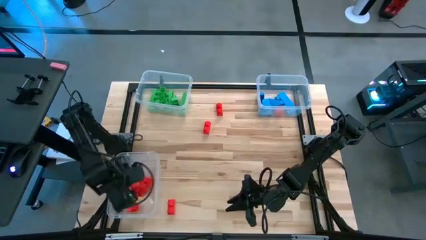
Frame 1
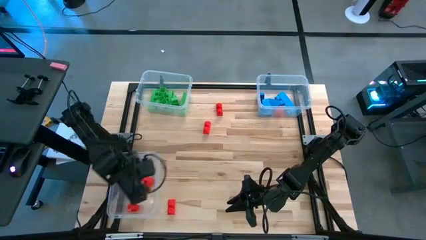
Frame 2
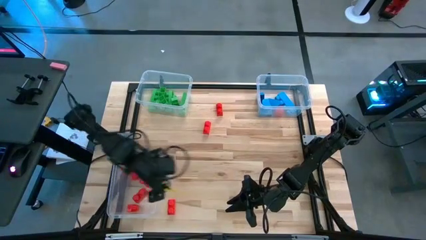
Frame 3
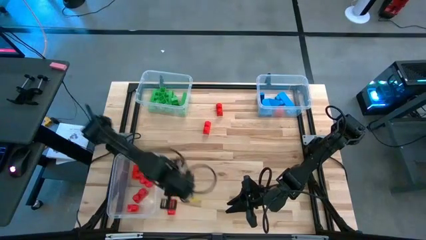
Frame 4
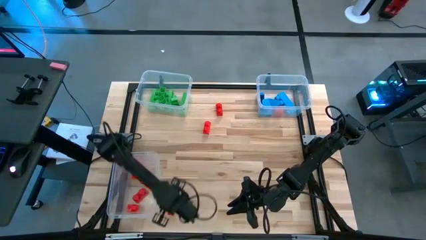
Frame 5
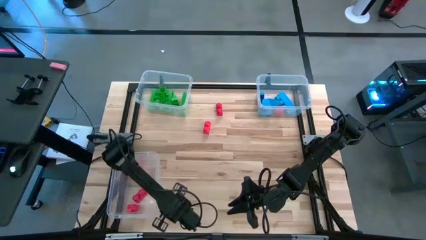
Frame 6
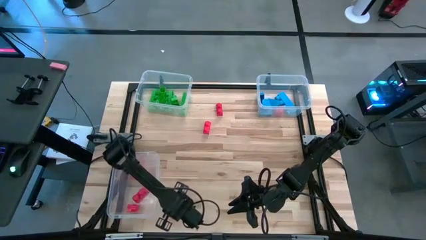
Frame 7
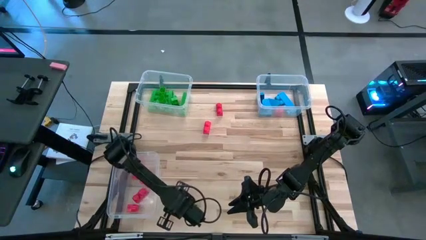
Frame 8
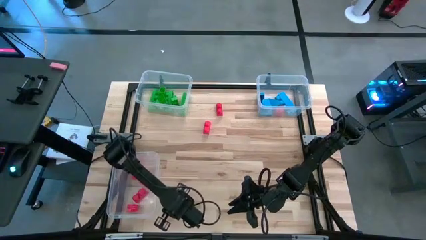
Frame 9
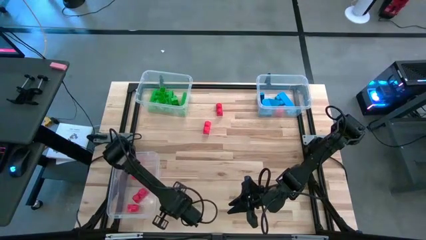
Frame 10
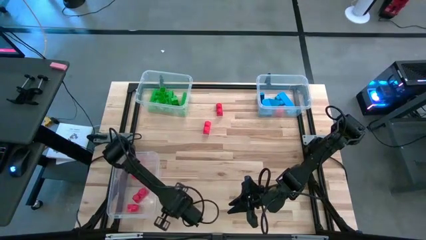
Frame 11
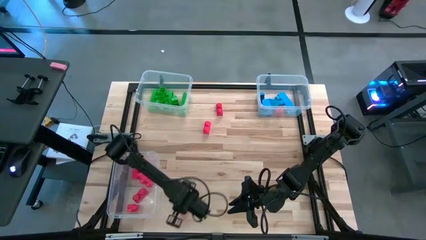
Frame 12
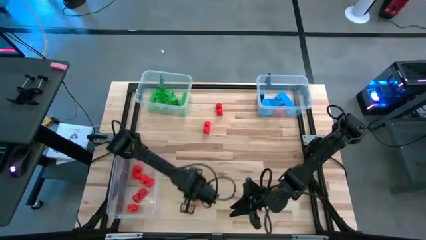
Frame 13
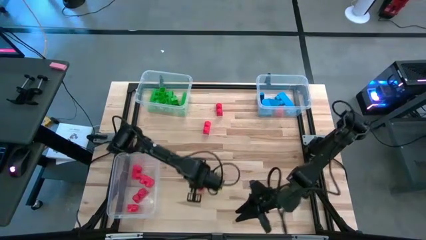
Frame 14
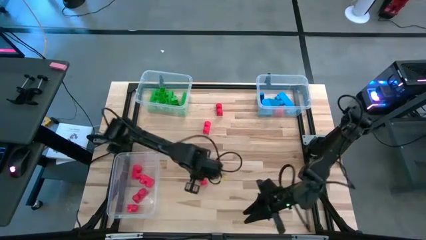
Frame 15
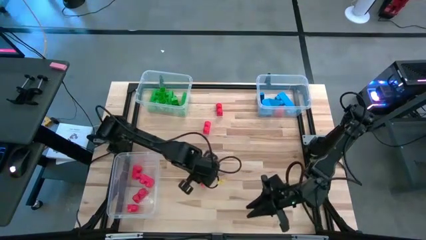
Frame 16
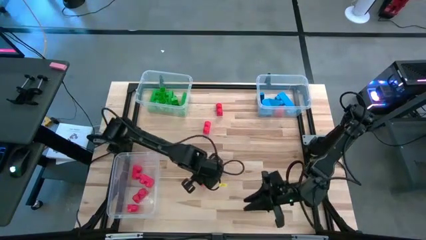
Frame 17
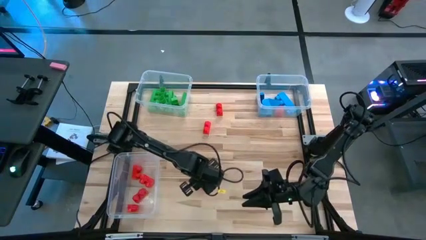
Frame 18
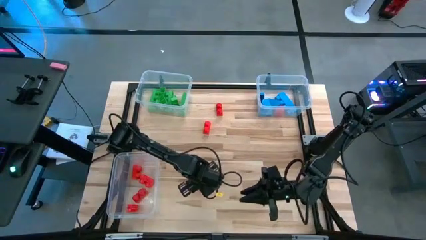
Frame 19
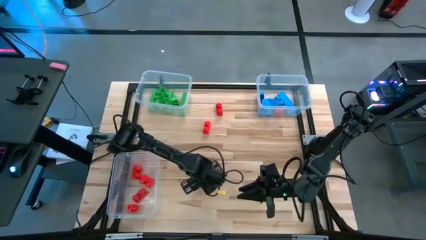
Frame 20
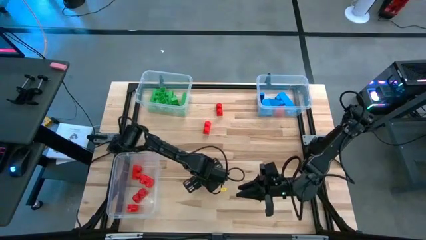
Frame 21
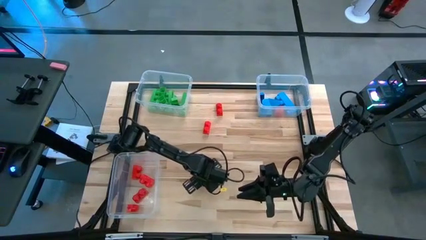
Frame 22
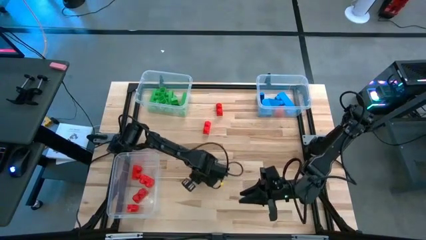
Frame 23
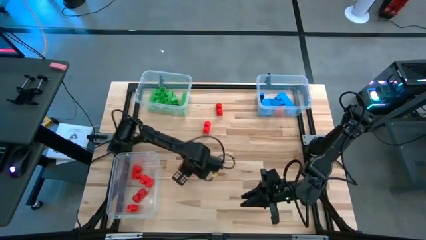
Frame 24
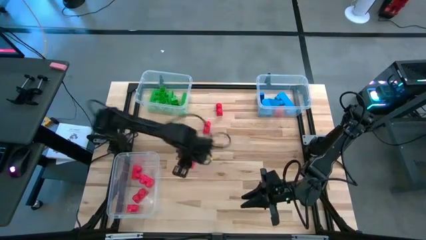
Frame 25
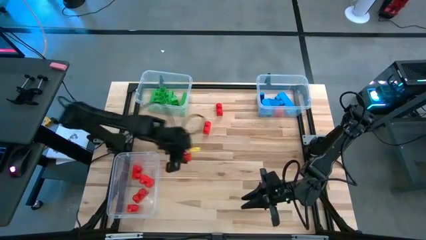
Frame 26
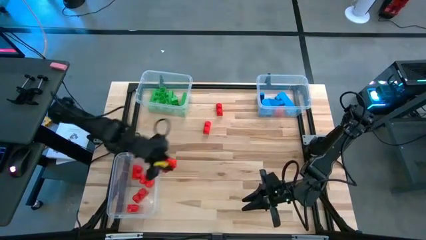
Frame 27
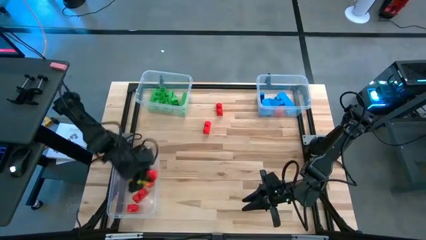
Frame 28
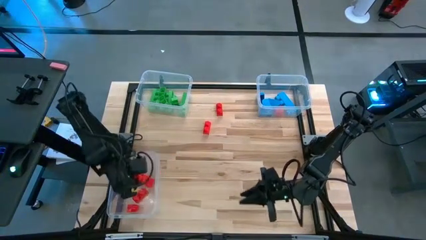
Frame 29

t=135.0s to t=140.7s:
Task: Sort blocks
Put the red game piece into the bottom transparent bin

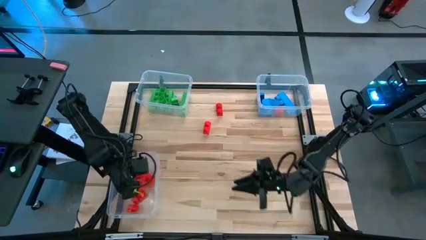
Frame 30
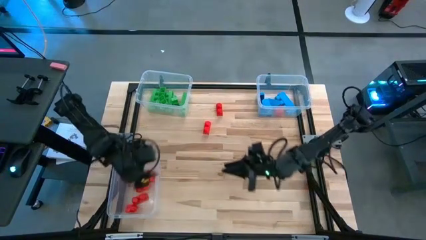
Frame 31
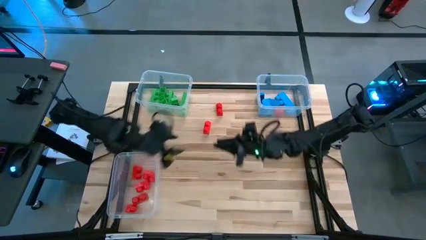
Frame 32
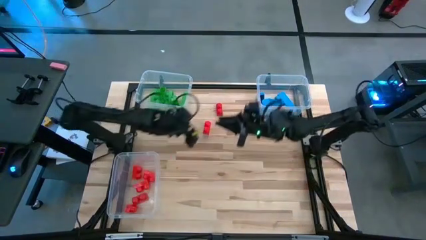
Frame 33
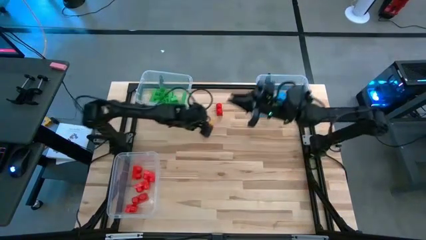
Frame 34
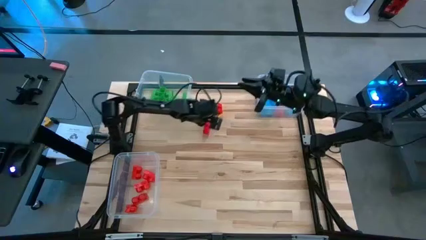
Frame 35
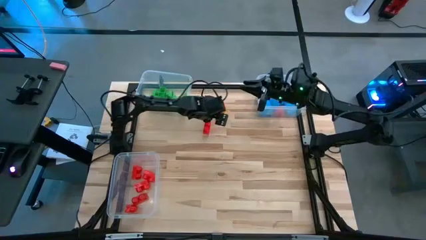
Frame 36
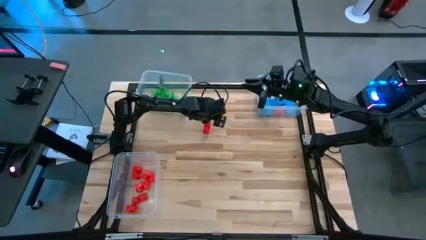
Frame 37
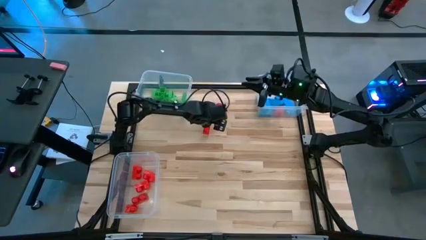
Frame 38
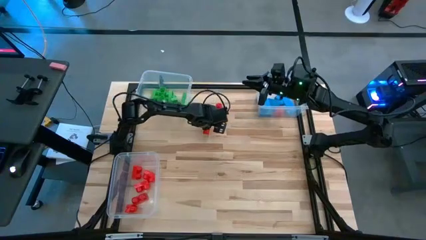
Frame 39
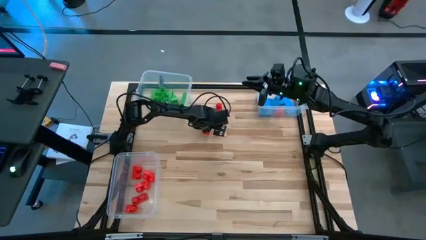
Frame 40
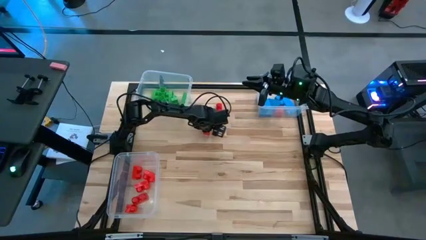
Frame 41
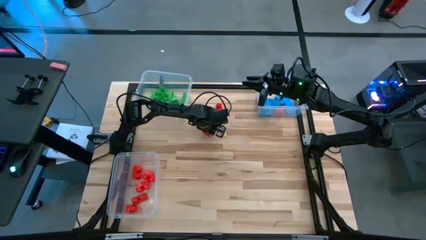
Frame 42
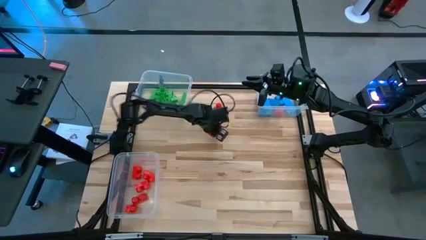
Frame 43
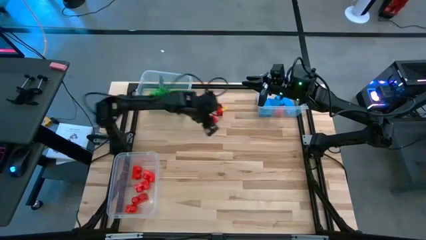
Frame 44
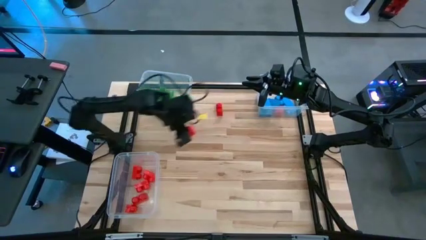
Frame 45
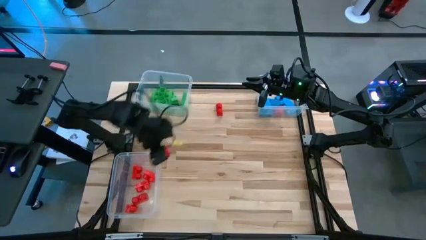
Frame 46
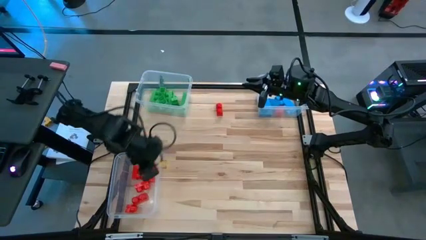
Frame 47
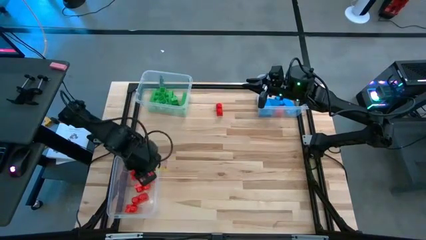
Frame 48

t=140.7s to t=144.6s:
Put the red game piece into the bottom transparent bin

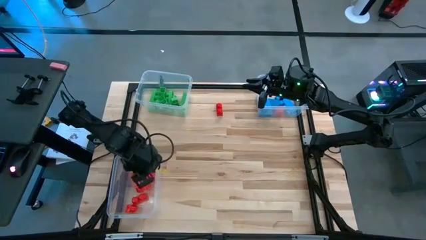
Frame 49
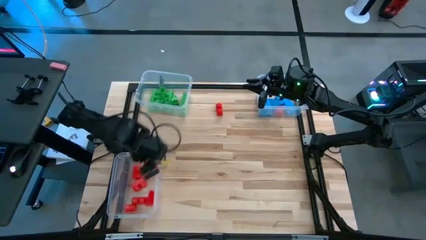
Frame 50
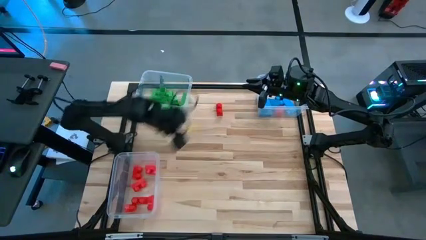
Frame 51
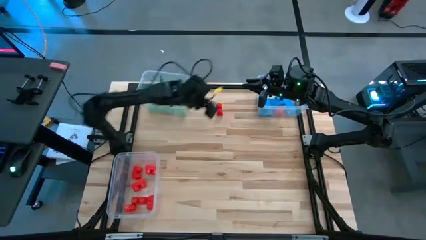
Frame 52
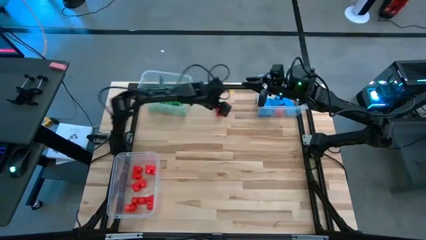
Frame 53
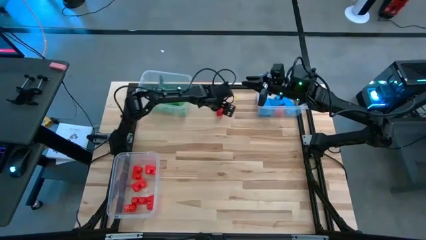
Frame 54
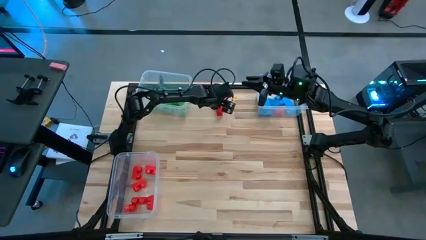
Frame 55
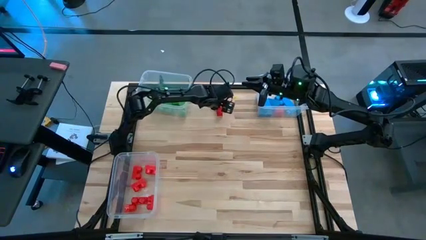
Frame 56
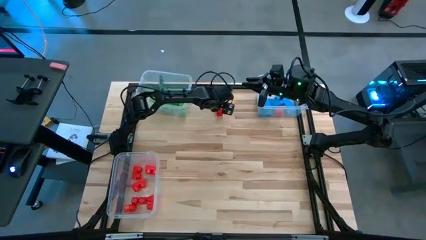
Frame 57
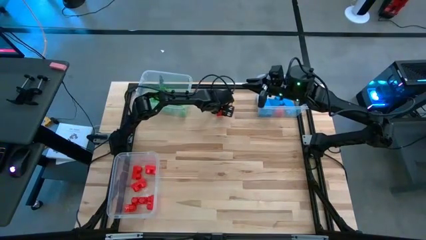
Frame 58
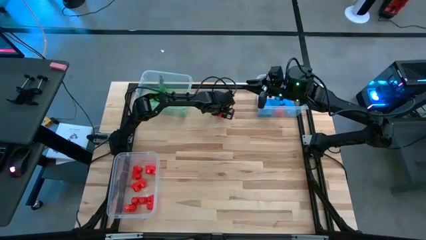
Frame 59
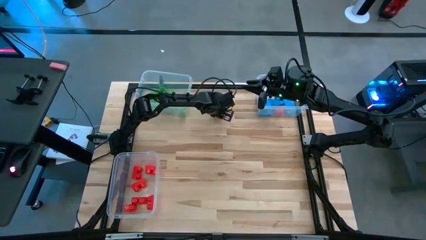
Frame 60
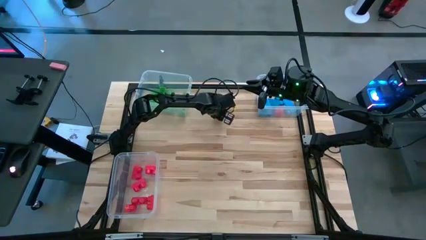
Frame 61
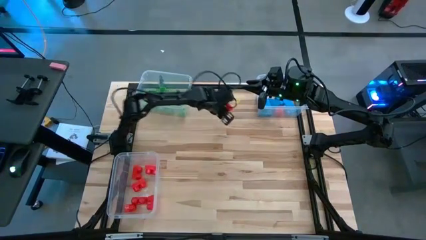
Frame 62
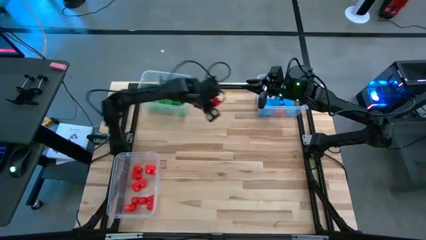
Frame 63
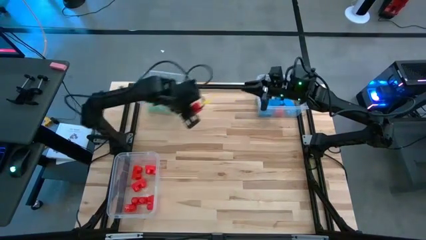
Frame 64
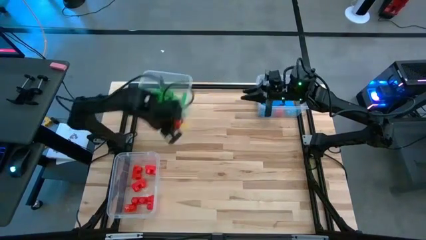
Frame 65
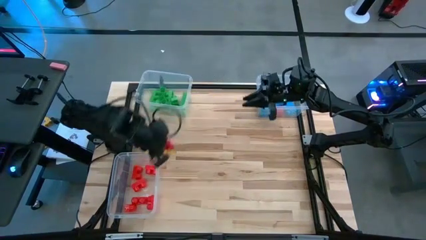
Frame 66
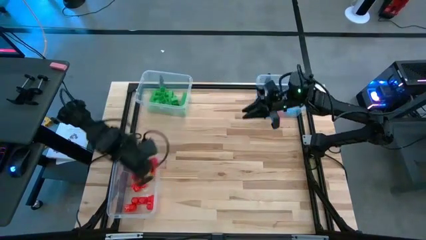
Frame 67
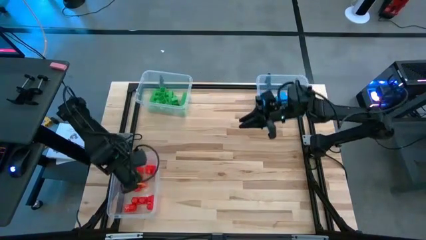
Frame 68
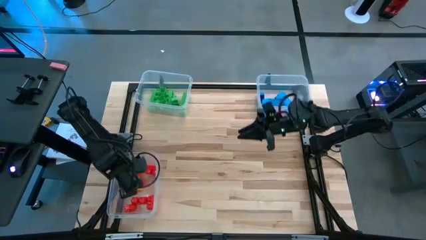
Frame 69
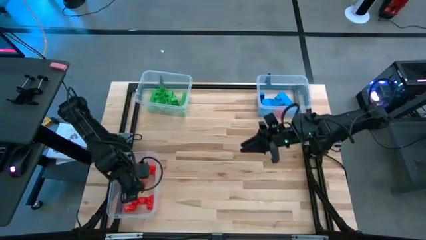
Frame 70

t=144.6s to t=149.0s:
Put the red game piece into the bottom transparent bin

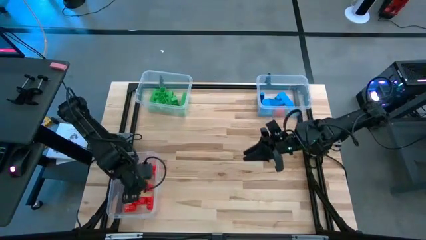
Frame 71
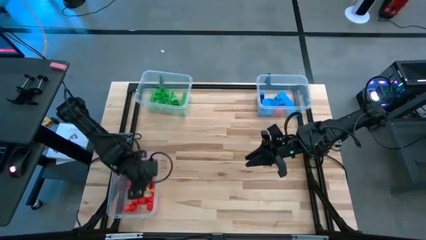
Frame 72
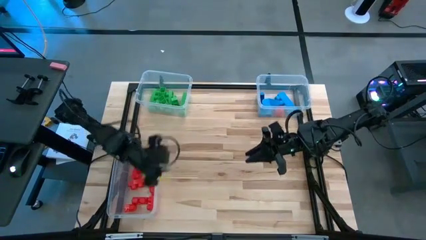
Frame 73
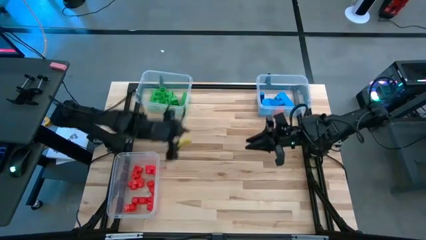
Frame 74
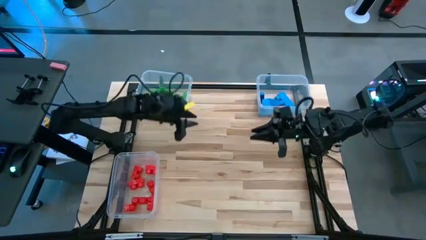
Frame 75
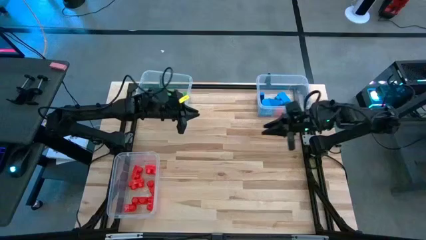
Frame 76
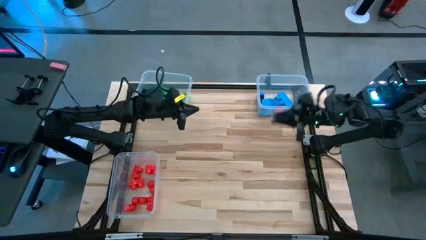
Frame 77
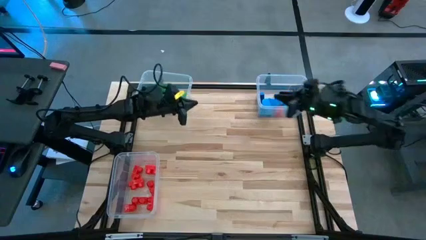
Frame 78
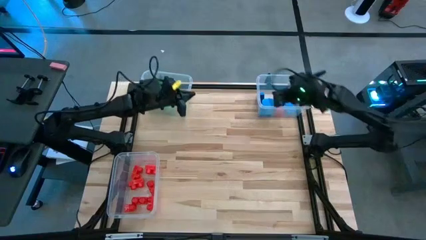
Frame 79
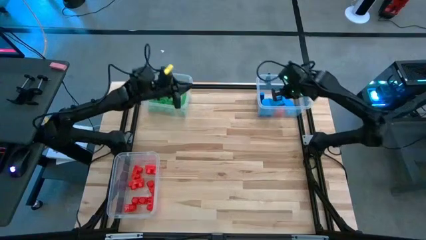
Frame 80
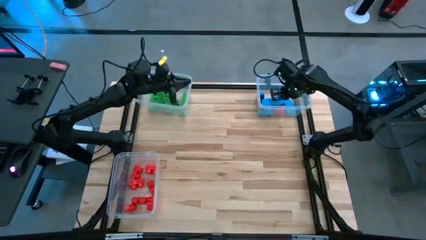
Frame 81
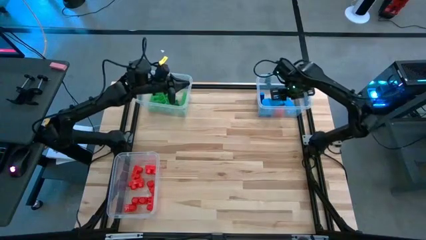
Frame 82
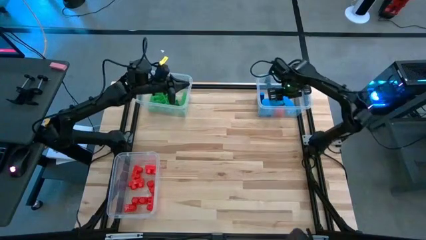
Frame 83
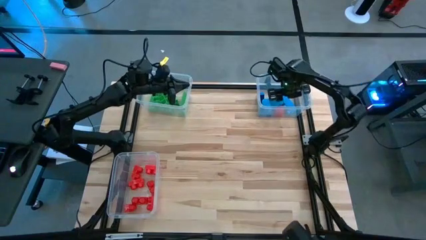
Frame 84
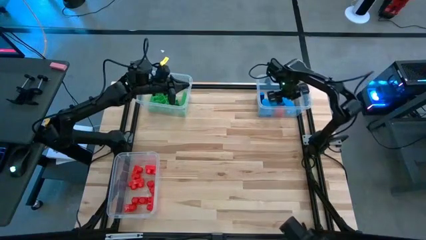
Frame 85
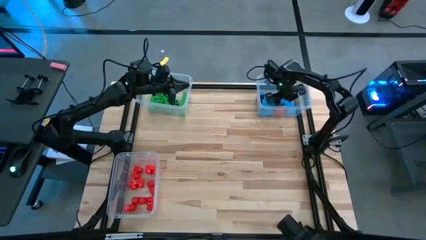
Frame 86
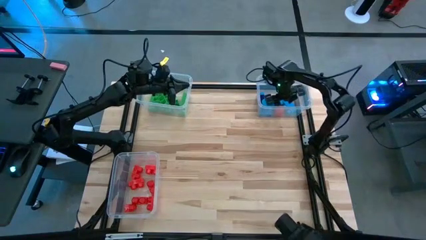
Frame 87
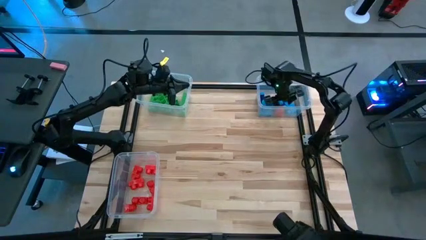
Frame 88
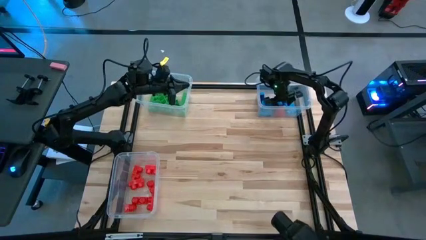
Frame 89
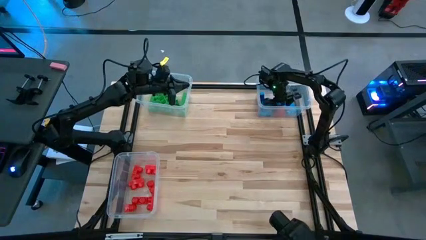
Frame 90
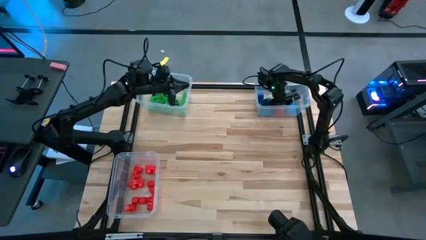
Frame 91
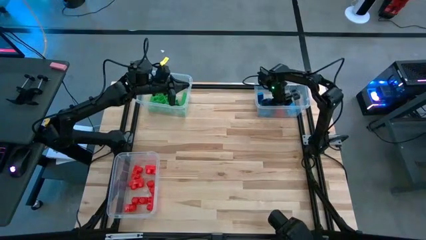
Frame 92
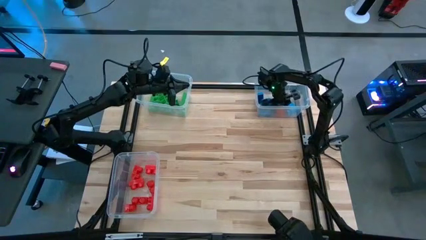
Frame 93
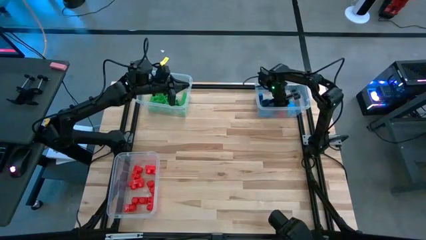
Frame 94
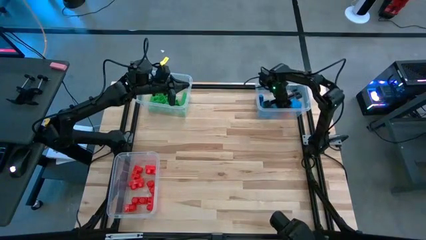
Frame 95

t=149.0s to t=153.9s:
Put the red game piece into the bottom transparent bin
